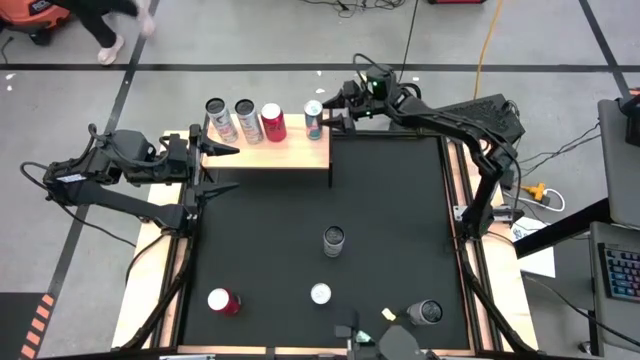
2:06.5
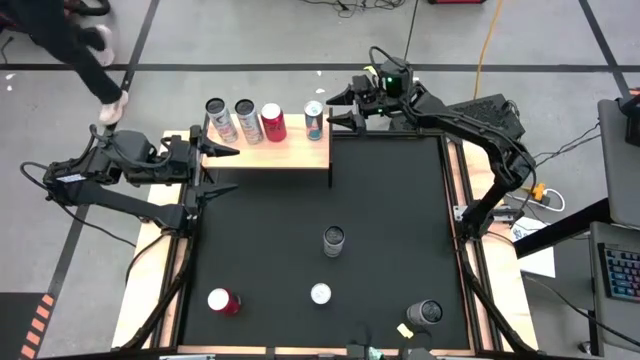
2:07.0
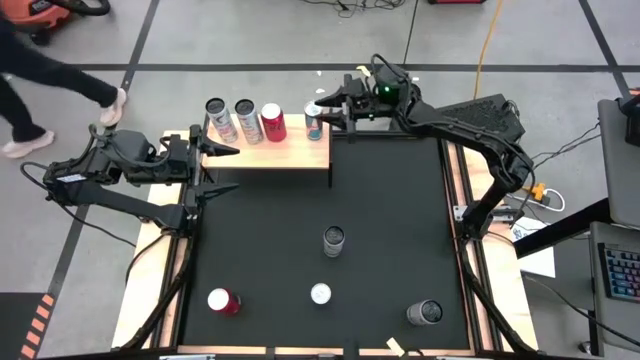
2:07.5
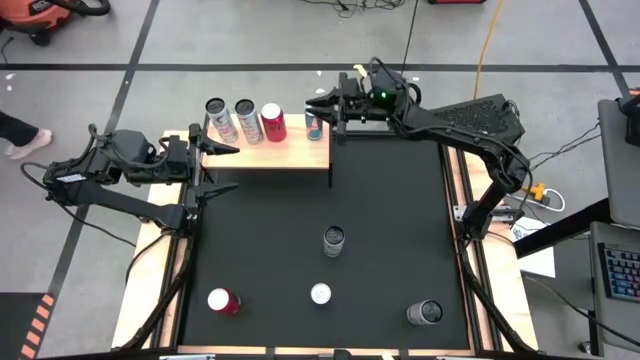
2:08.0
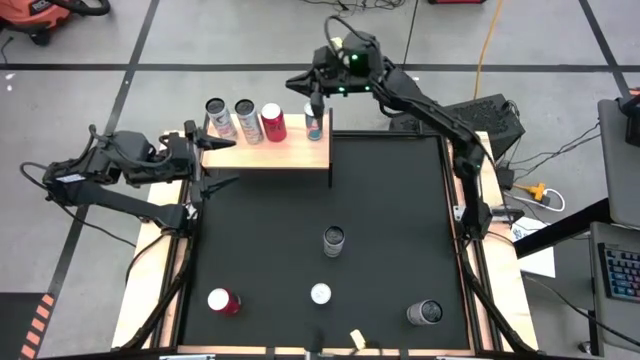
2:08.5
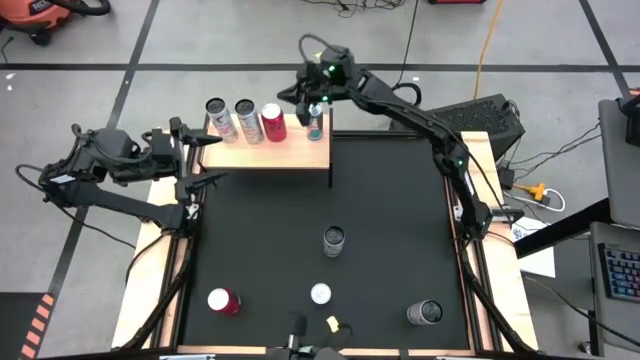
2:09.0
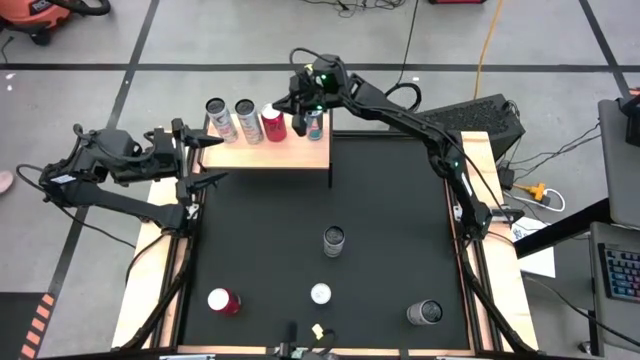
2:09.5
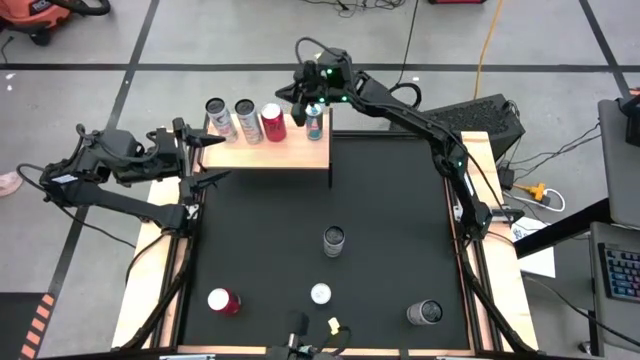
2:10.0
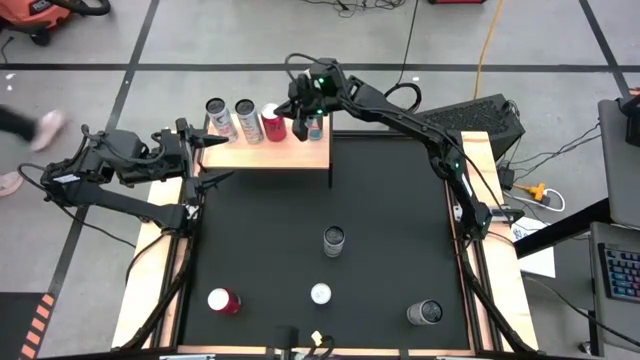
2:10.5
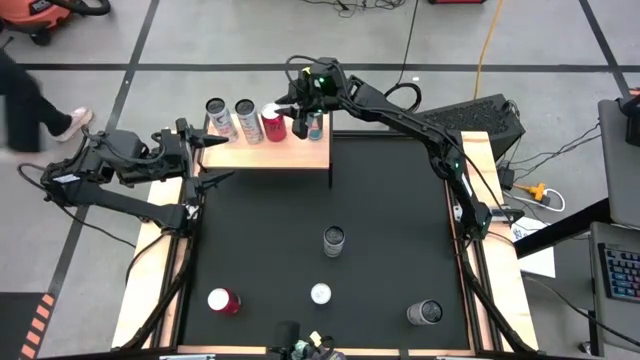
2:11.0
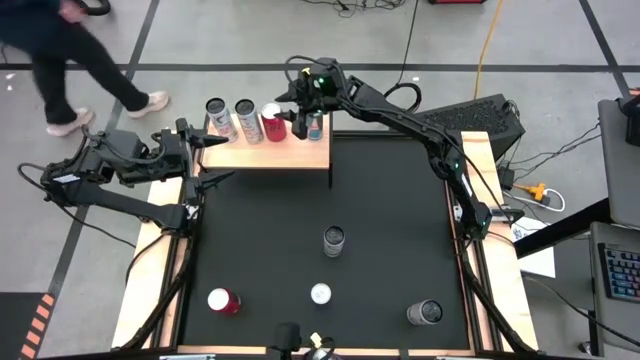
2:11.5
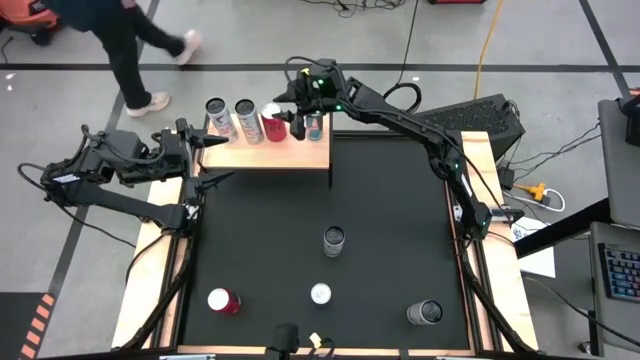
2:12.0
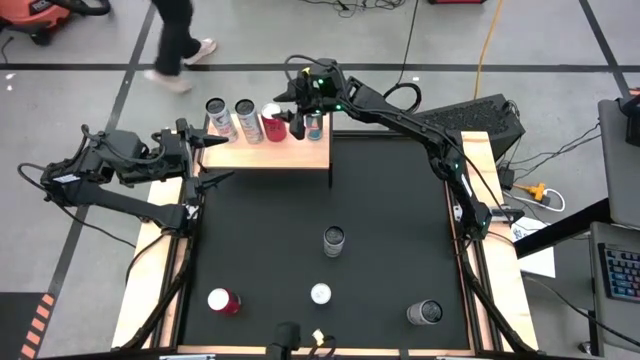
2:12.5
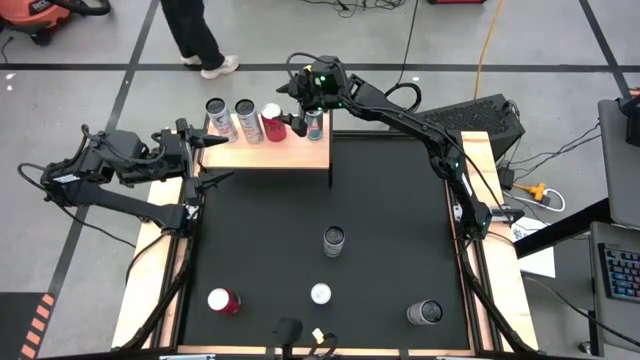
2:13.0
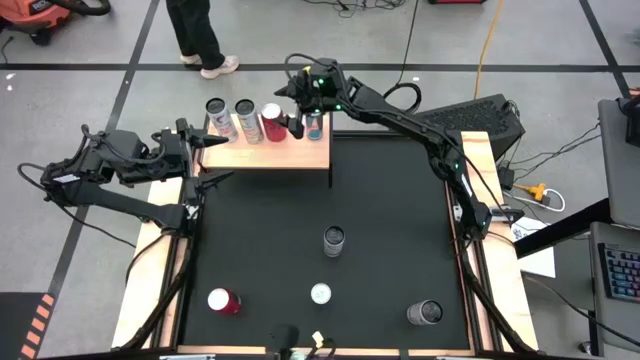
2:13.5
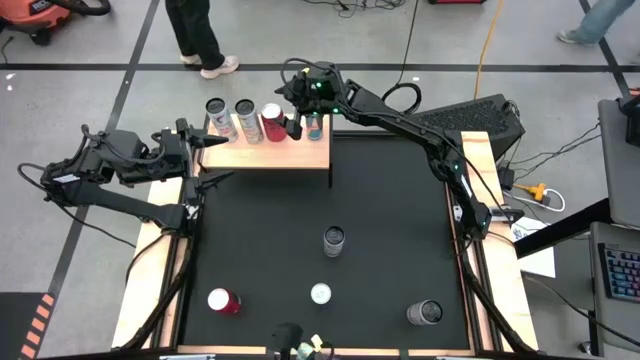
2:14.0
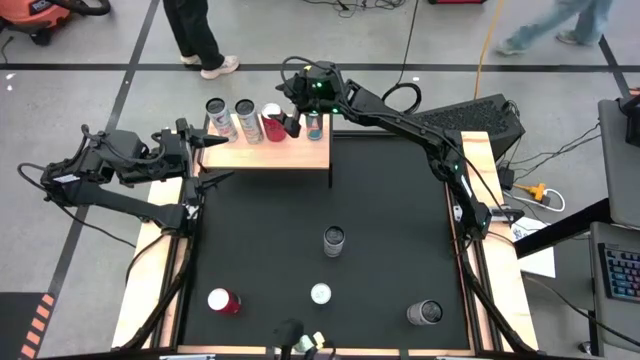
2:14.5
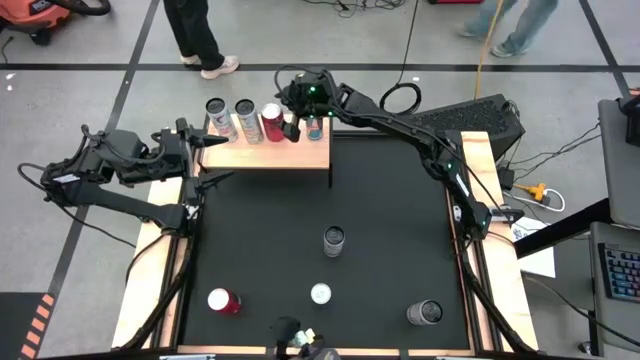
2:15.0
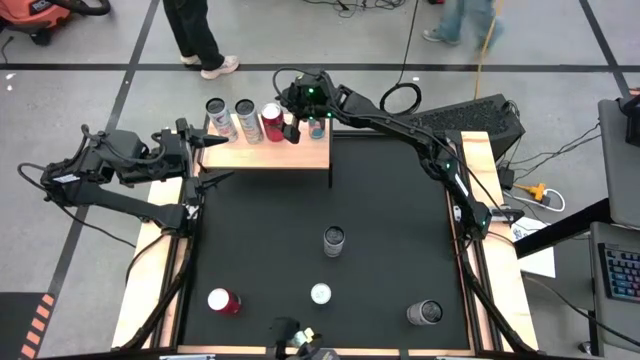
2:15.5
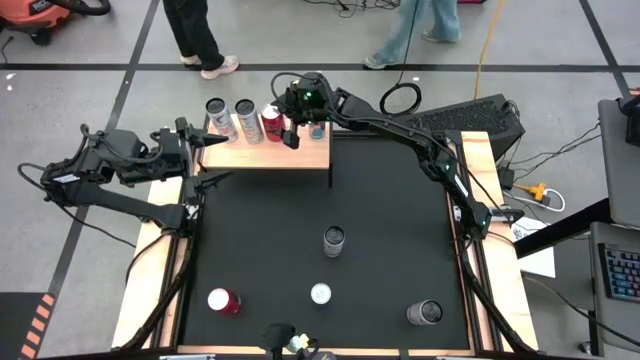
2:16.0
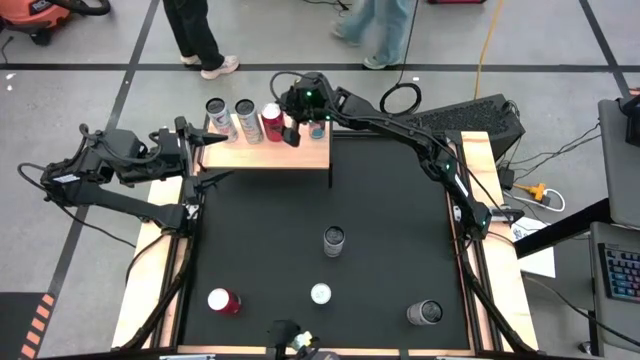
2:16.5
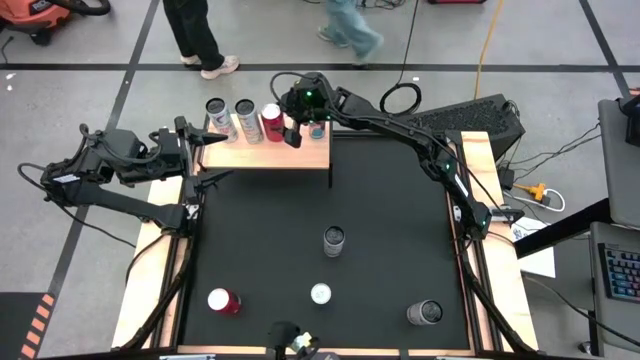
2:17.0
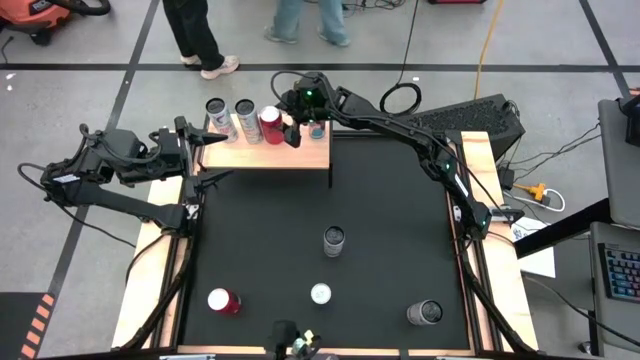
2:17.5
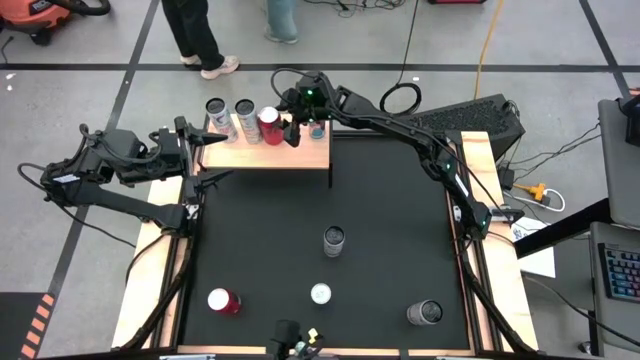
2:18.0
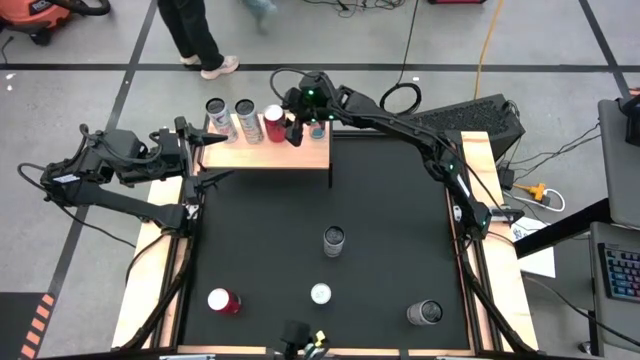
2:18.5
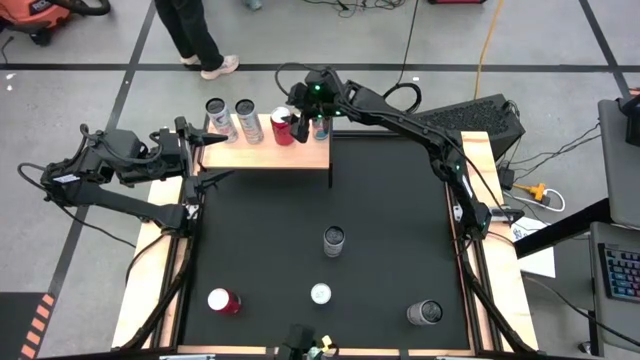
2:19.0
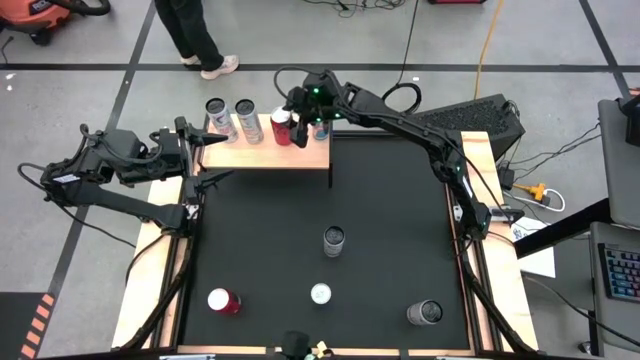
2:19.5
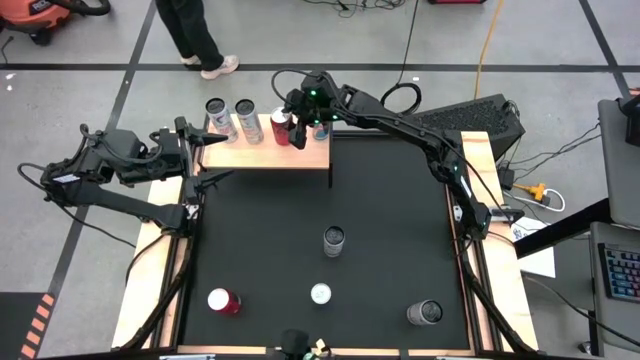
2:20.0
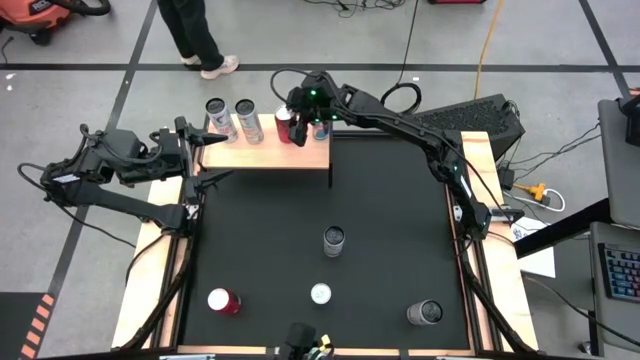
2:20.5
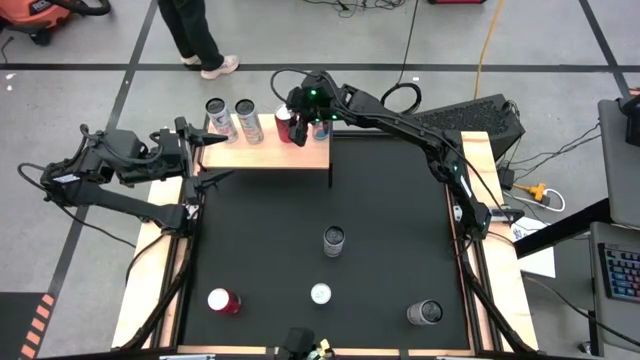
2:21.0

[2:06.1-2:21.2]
Task: Place canned beverage on shelf
Adjust the red black soda can on the shelf

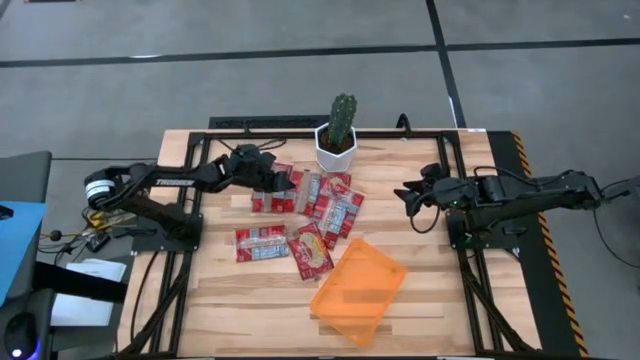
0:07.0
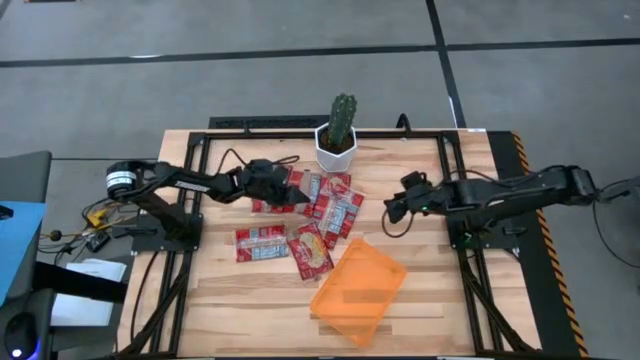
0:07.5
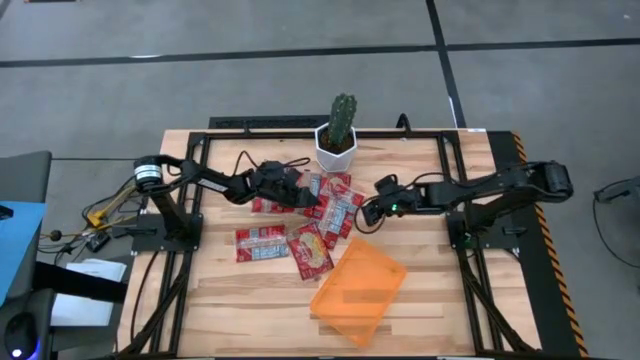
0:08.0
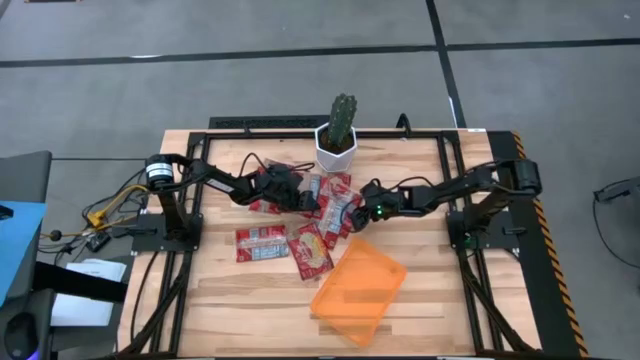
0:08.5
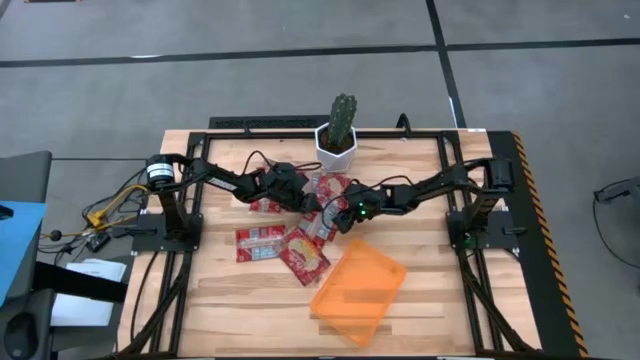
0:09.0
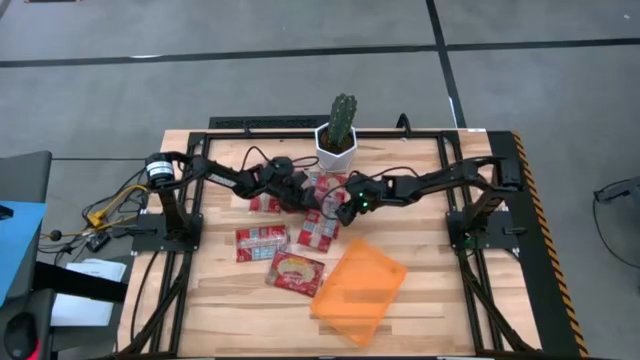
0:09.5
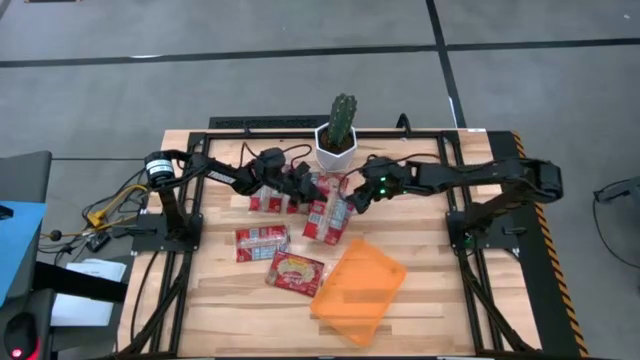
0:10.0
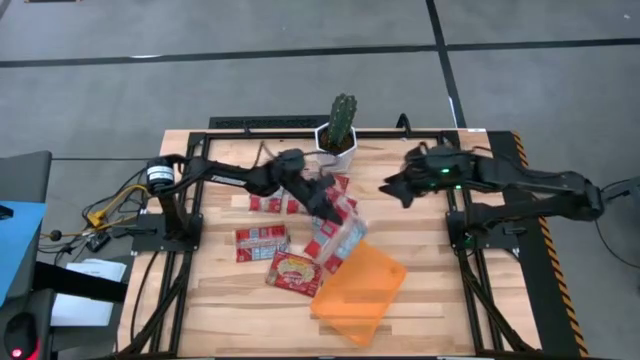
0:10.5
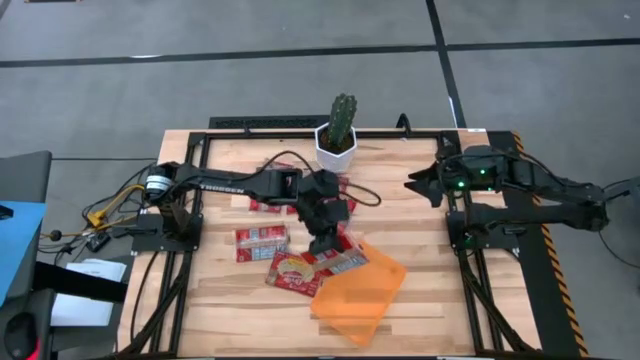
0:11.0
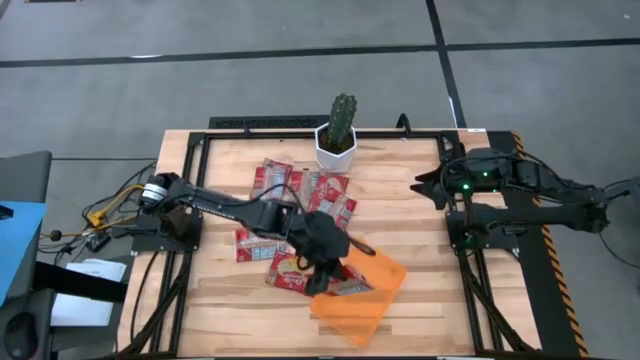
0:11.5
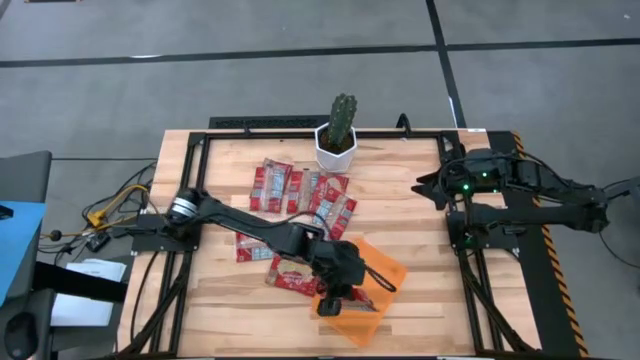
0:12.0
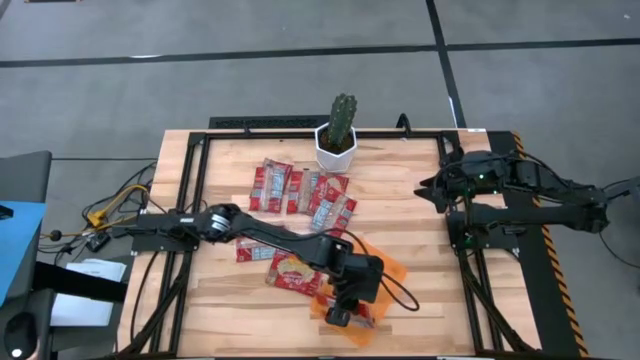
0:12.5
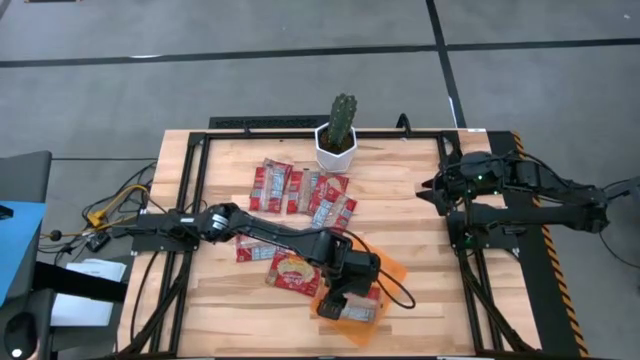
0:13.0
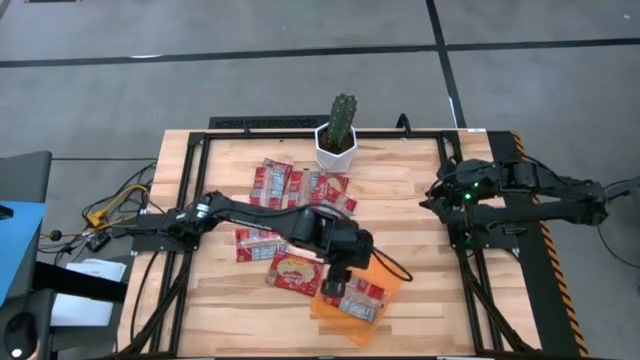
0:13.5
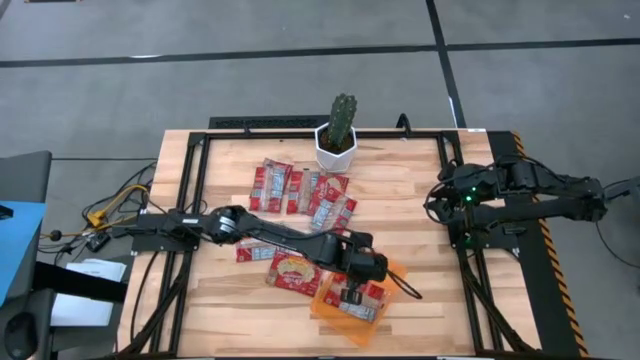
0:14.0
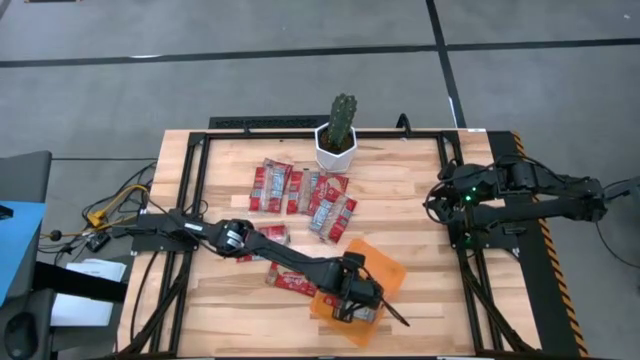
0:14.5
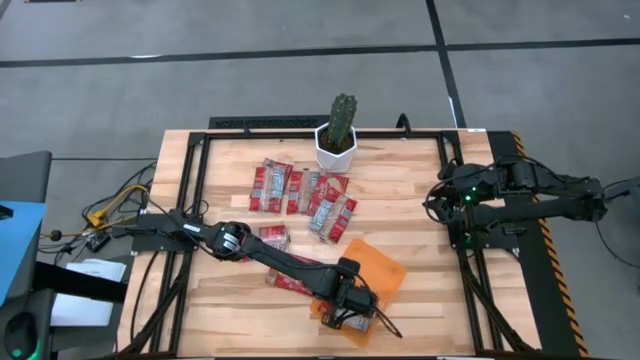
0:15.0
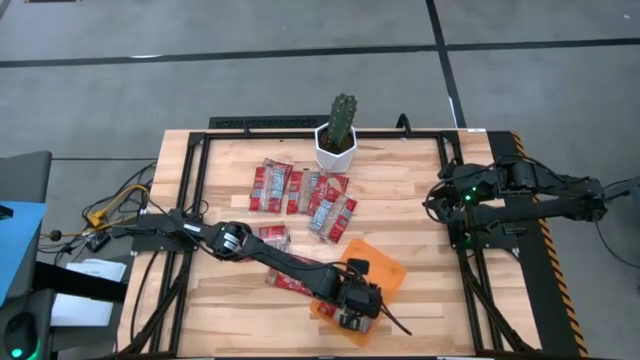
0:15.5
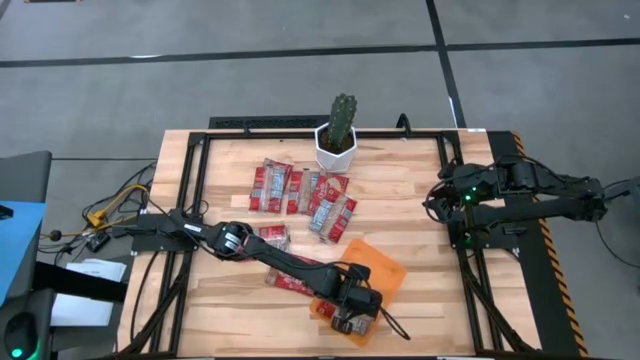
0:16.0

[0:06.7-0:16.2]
Task: Sort popcorn bags into baskets
Put the red popcorn bag into the orange container
